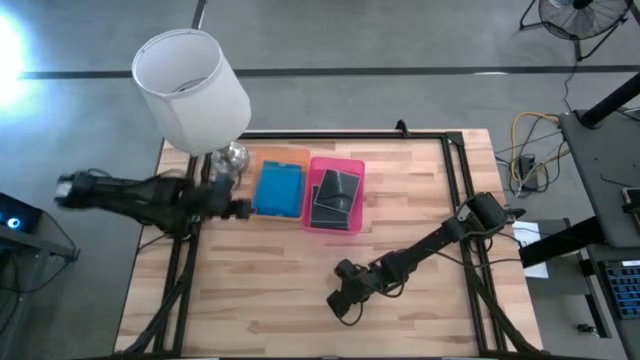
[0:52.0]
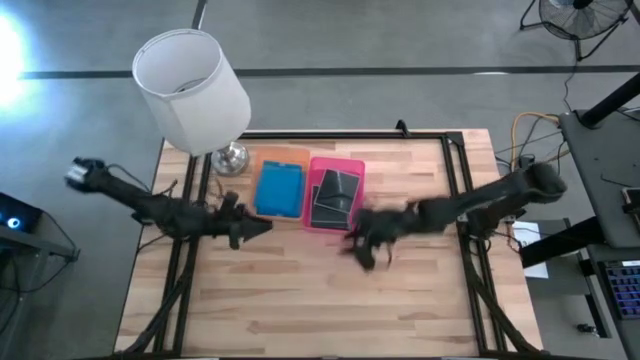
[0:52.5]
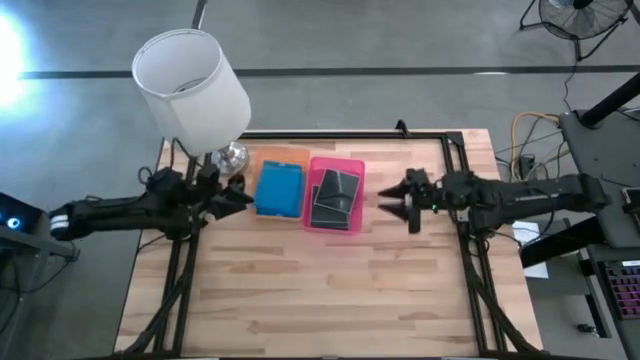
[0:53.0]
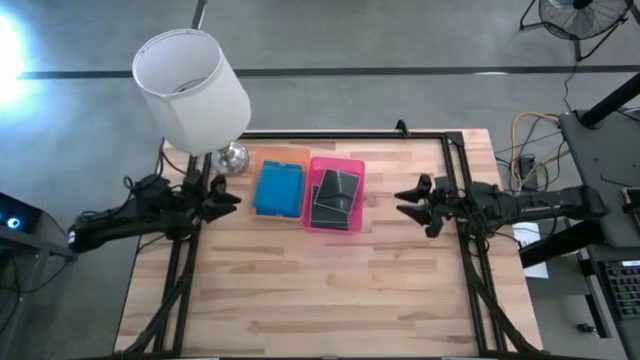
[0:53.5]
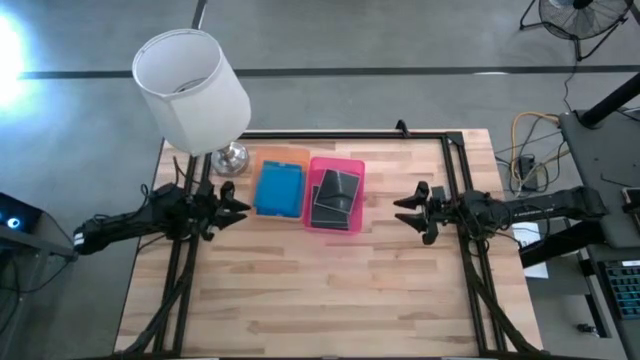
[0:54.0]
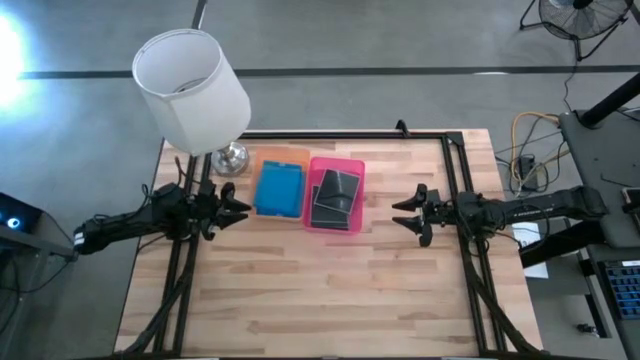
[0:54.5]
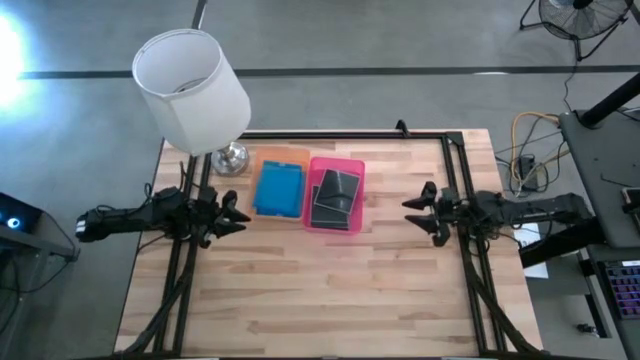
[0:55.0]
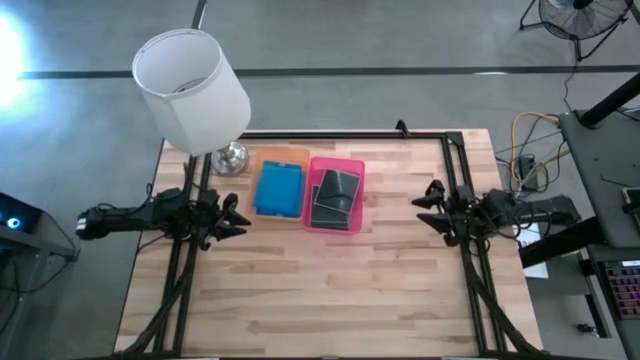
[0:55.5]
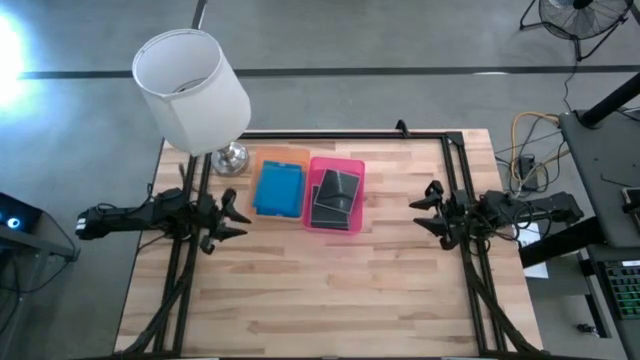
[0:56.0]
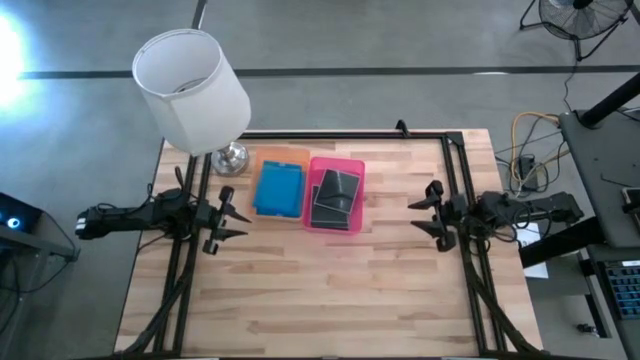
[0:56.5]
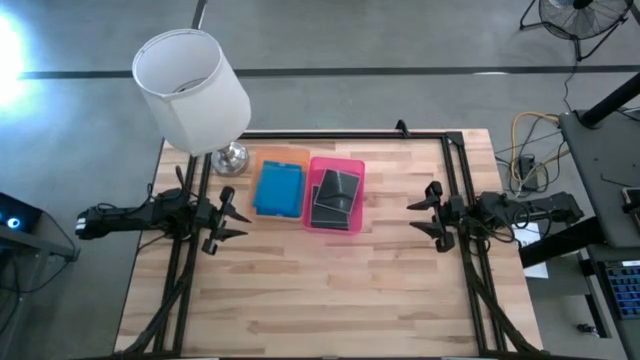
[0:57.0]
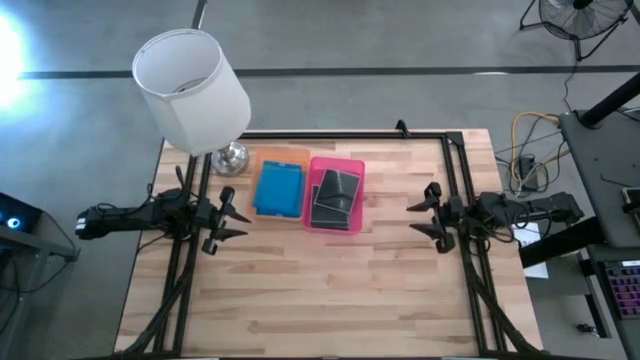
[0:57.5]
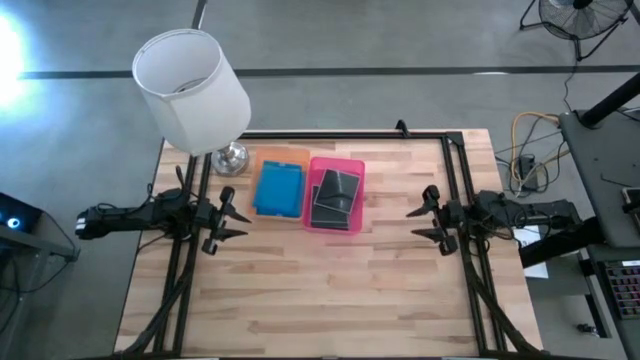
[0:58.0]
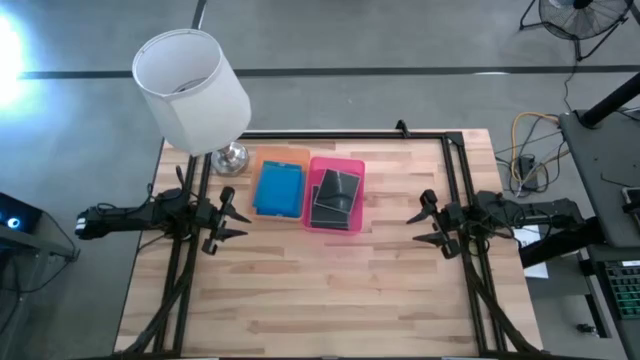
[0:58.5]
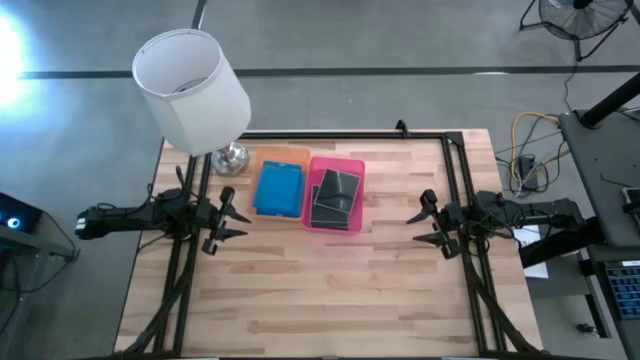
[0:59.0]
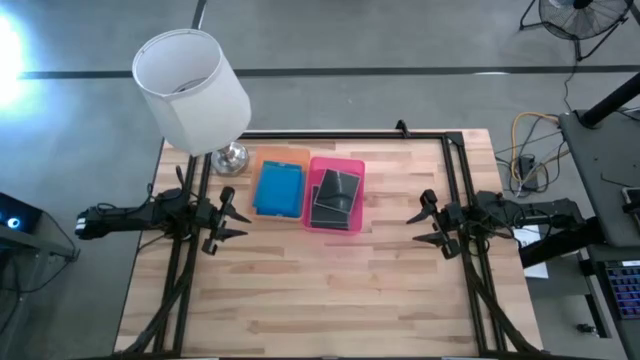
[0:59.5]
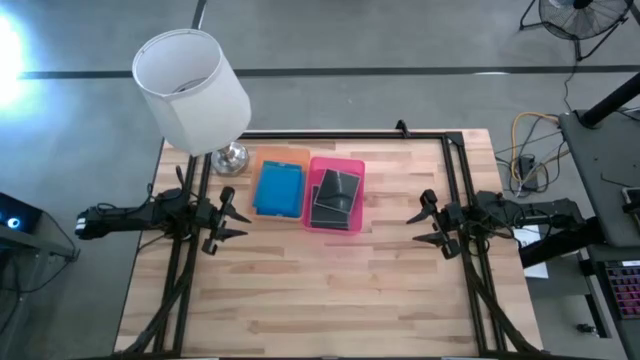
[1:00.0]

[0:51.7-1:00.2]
Task: Pick & place jewel cases by type
Return to Home Position

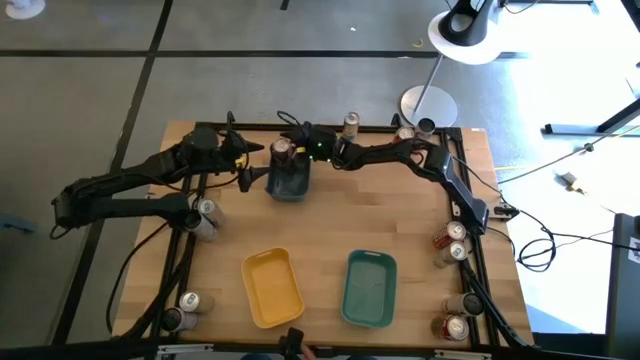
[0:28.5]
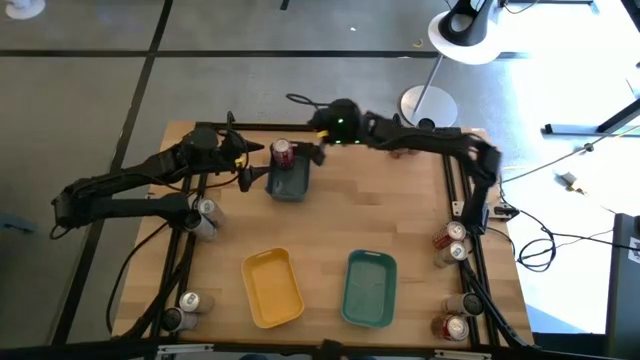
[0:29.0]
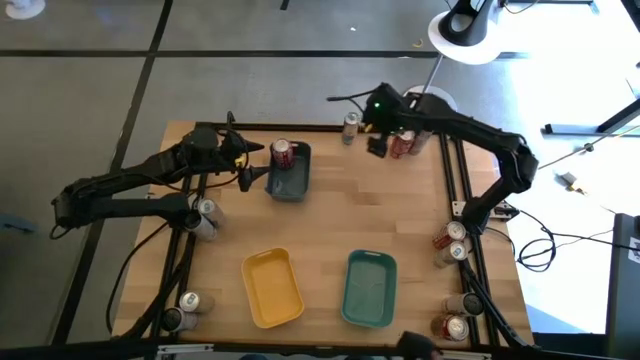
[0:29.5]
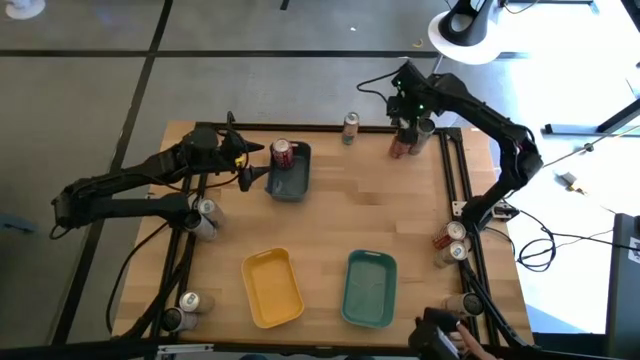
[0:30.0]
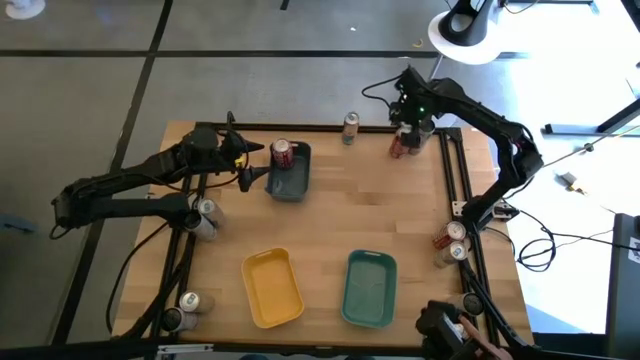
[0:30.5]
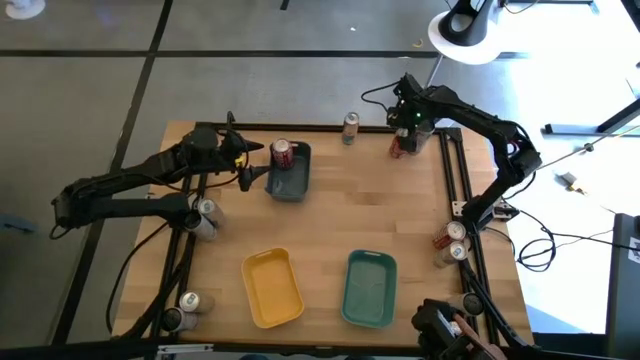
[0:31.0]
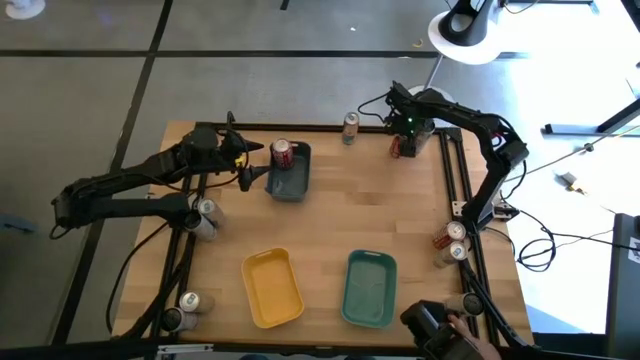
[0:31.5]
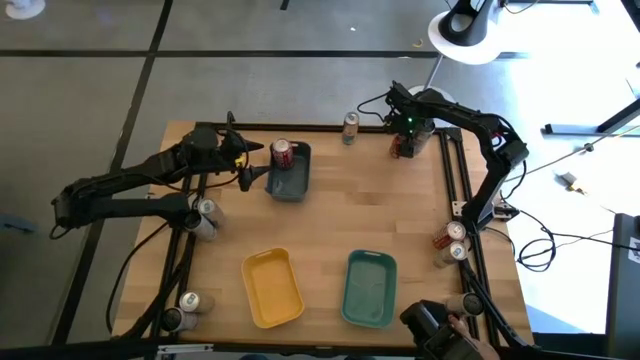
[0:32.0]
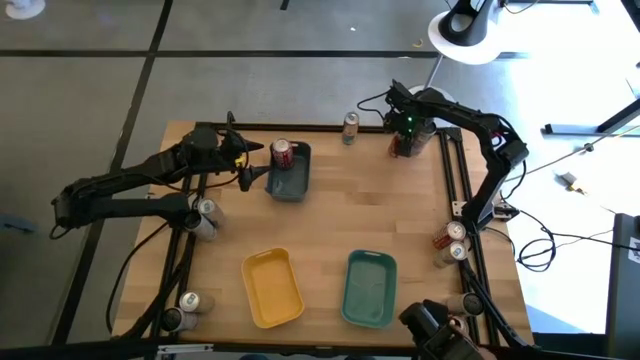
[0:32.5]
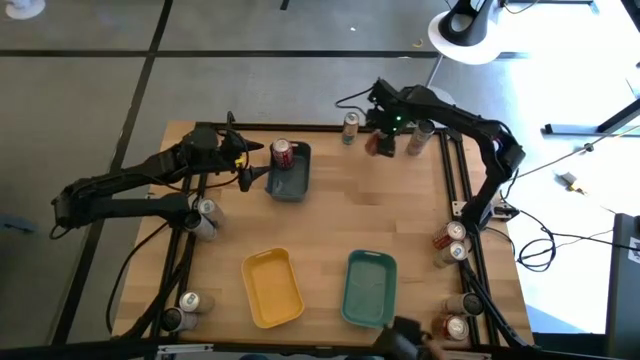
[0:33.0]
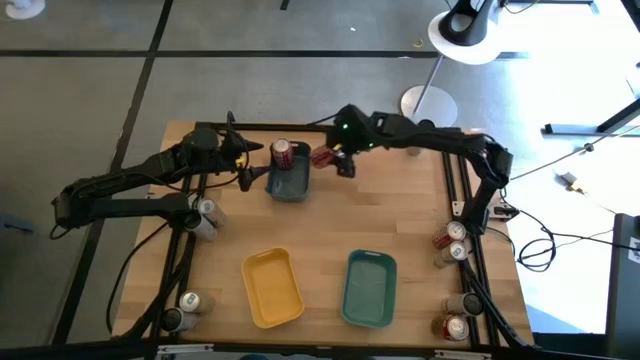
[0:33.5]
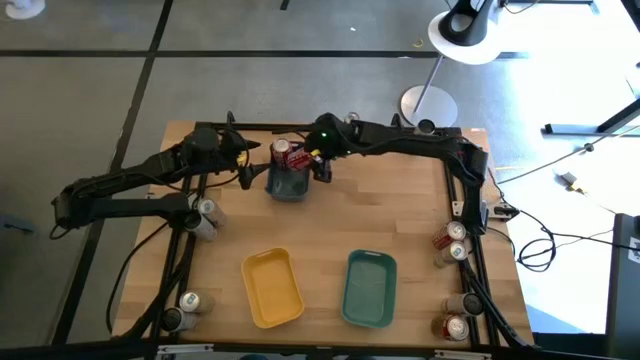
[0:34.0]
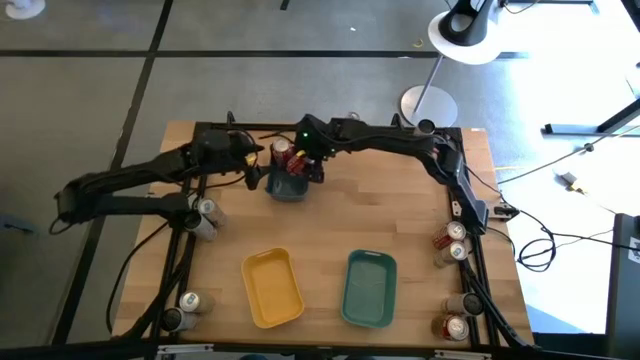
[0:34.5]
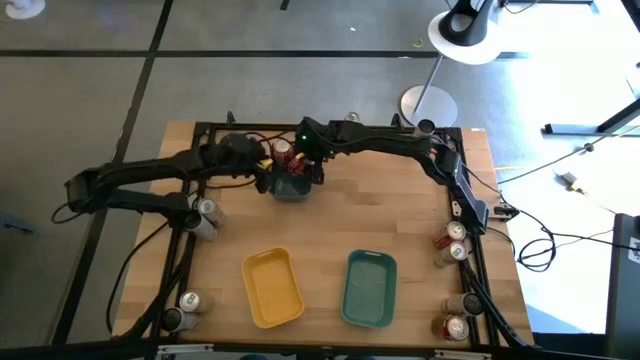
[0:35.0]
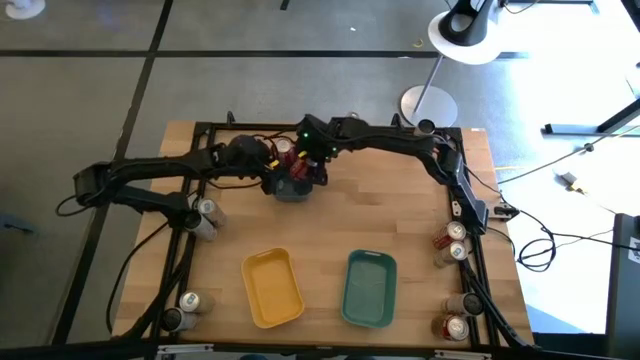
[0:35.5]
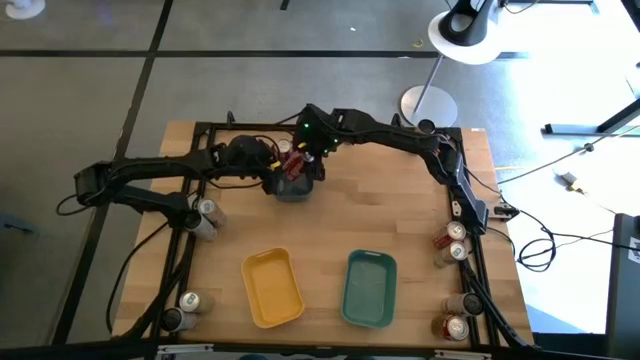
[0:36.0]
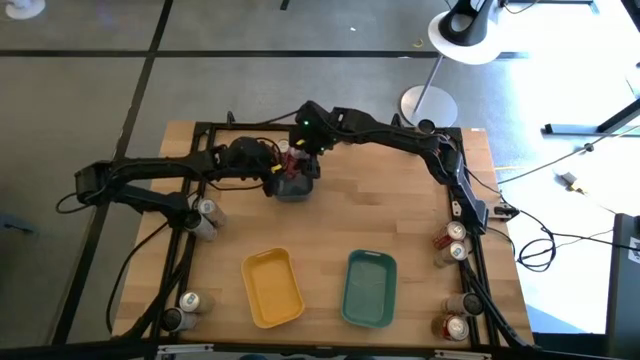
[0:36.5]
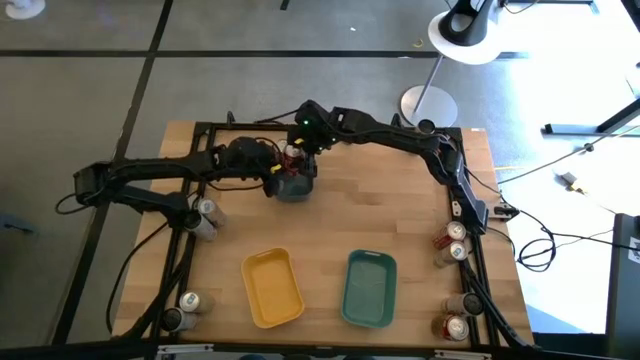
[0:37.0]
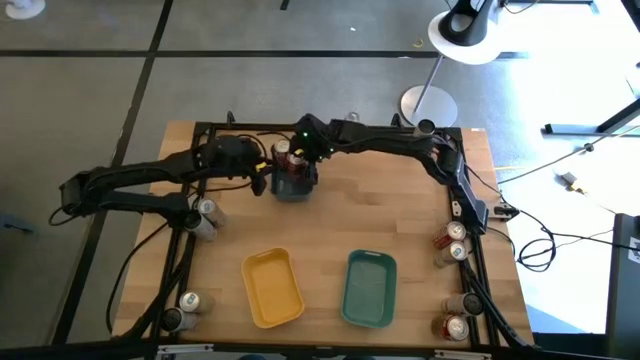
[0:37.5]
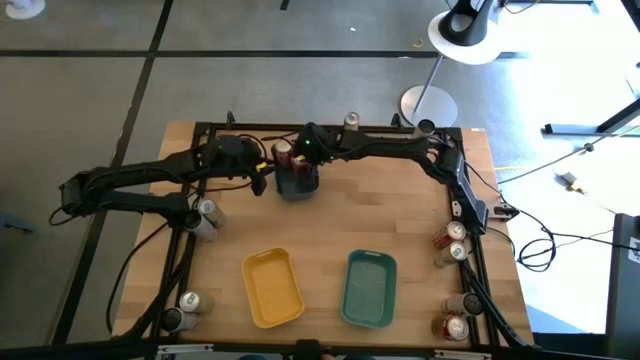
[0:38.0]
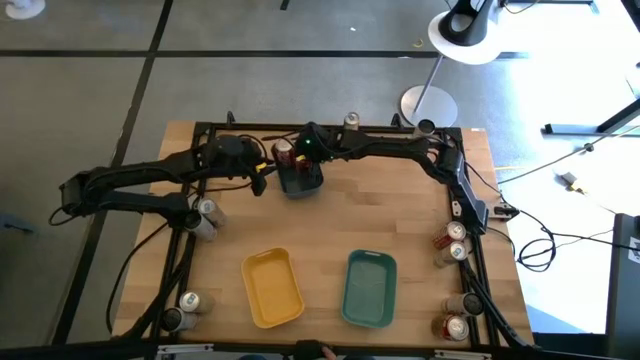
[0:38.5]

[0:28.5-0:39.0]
Task: Sort soda cans
Put the red and white soda can into the blue bin
